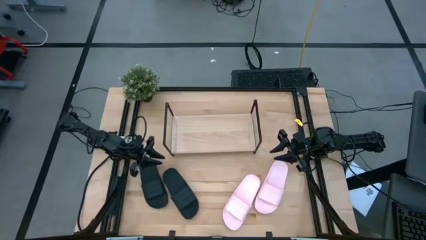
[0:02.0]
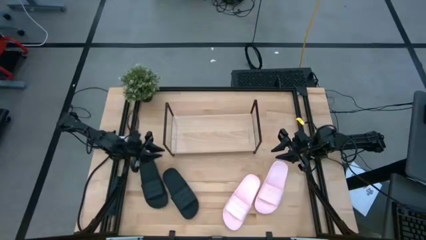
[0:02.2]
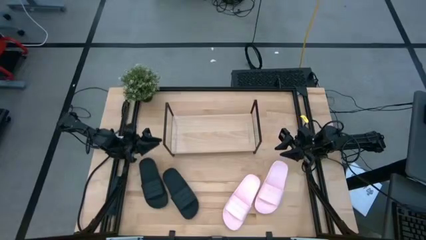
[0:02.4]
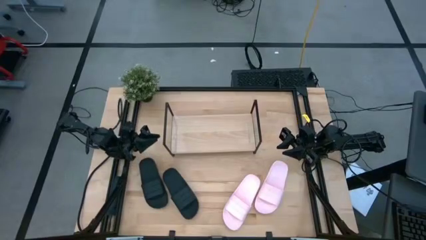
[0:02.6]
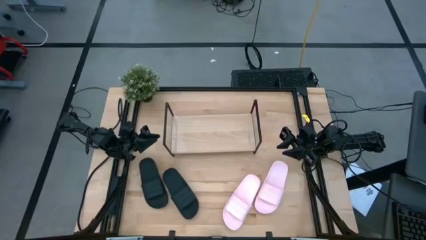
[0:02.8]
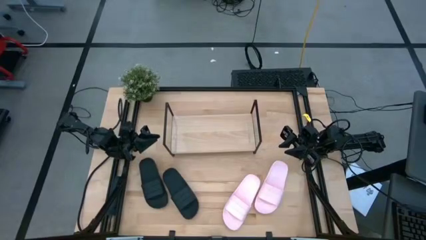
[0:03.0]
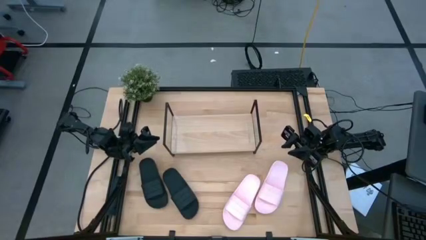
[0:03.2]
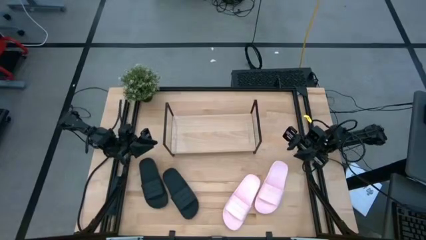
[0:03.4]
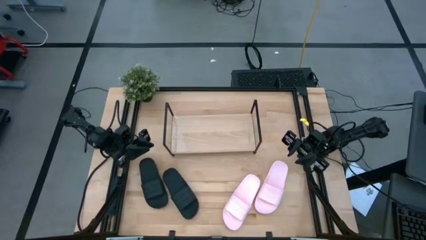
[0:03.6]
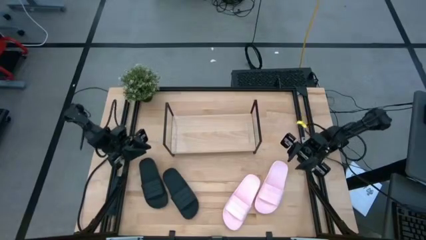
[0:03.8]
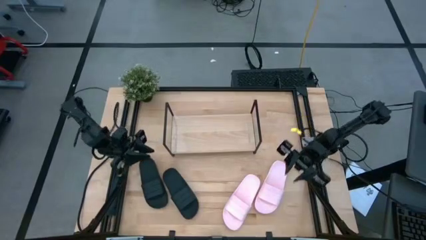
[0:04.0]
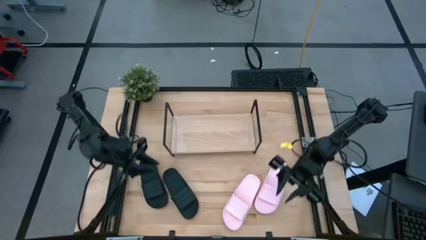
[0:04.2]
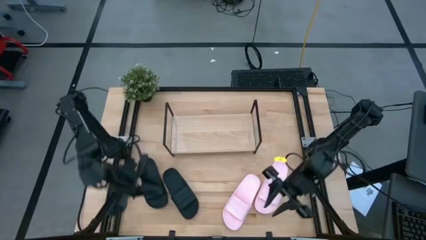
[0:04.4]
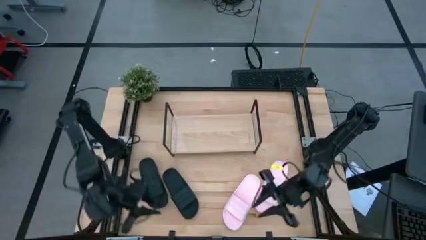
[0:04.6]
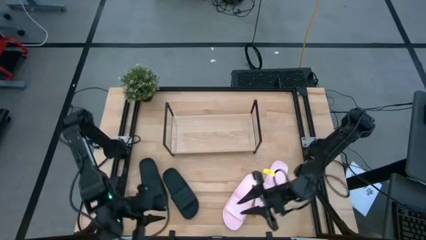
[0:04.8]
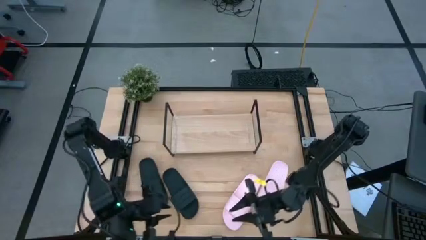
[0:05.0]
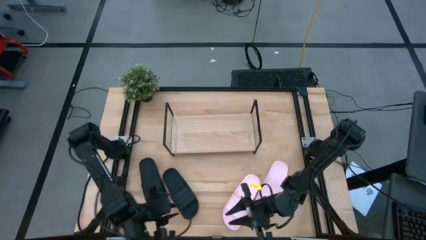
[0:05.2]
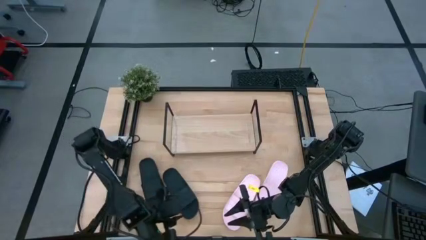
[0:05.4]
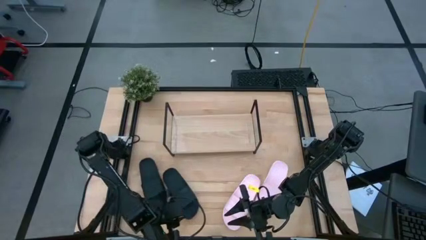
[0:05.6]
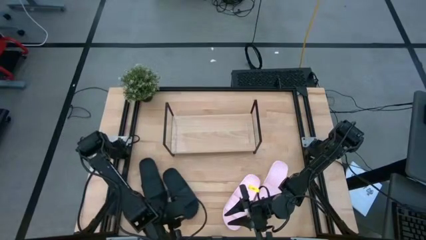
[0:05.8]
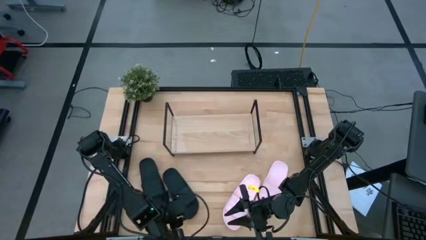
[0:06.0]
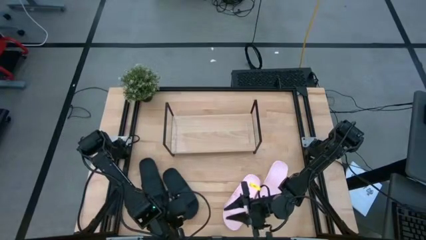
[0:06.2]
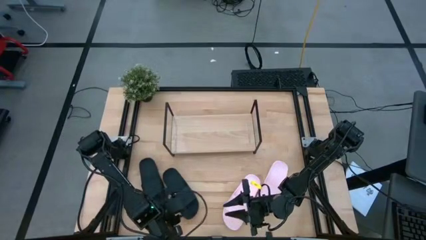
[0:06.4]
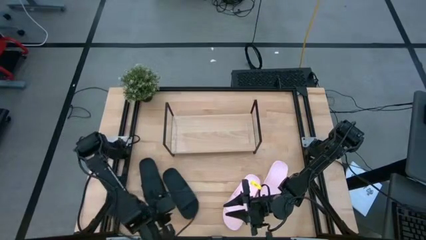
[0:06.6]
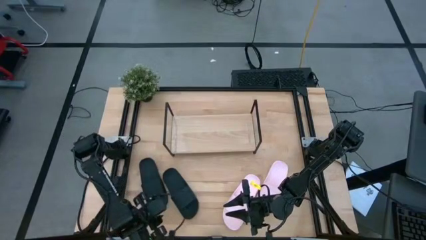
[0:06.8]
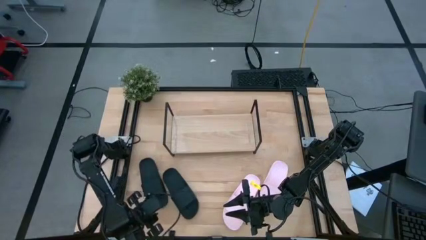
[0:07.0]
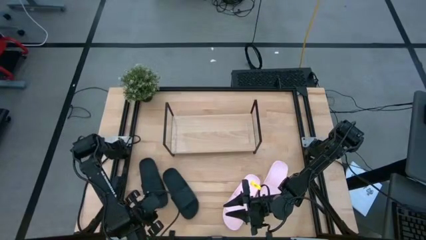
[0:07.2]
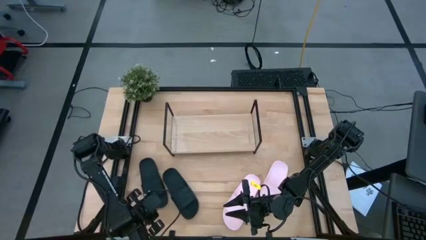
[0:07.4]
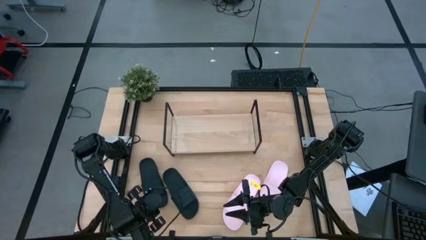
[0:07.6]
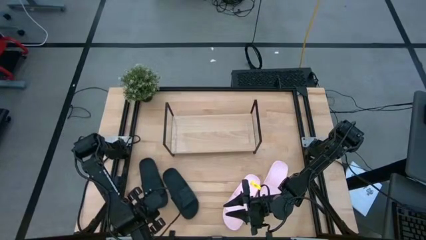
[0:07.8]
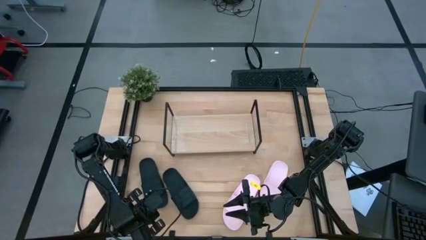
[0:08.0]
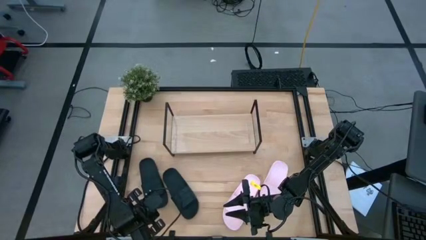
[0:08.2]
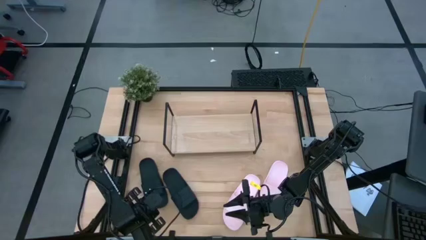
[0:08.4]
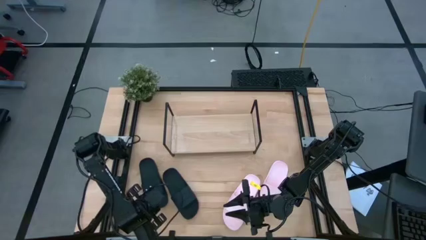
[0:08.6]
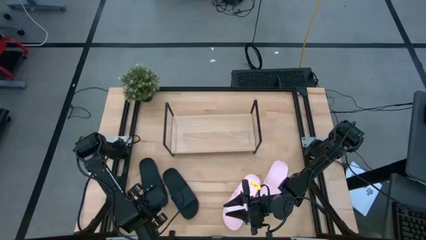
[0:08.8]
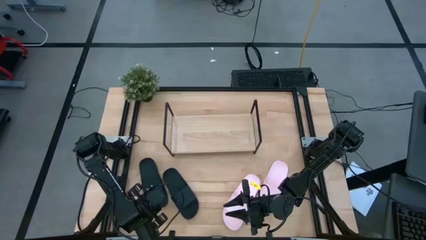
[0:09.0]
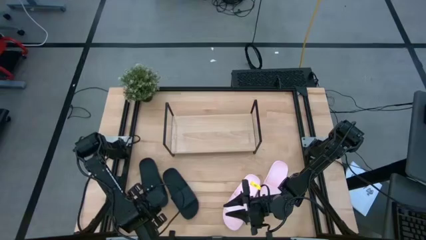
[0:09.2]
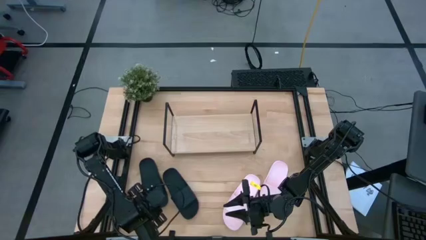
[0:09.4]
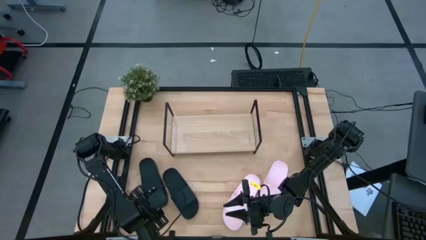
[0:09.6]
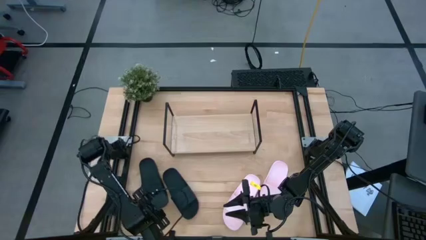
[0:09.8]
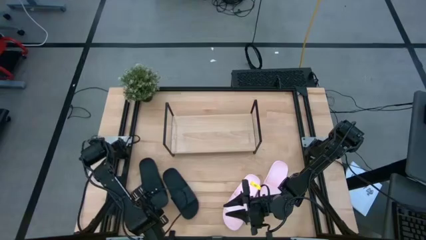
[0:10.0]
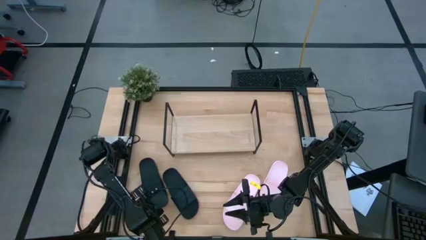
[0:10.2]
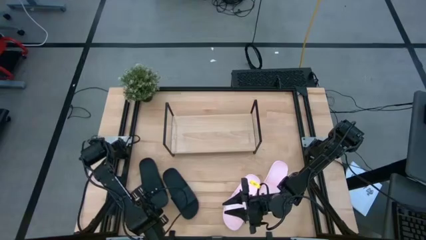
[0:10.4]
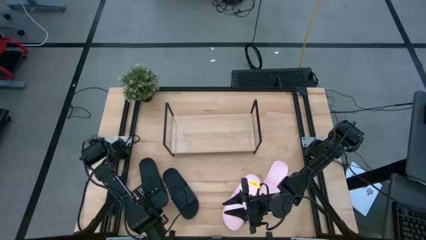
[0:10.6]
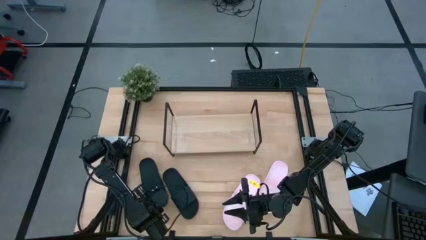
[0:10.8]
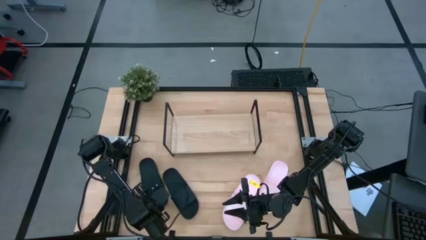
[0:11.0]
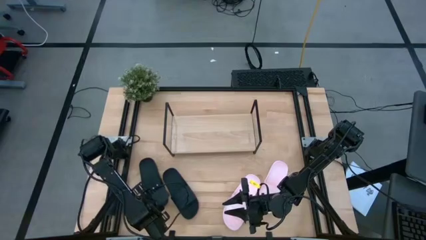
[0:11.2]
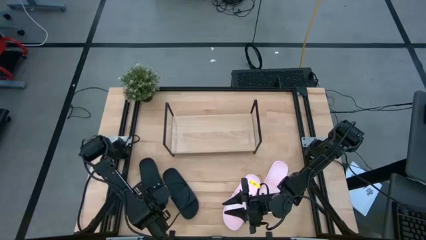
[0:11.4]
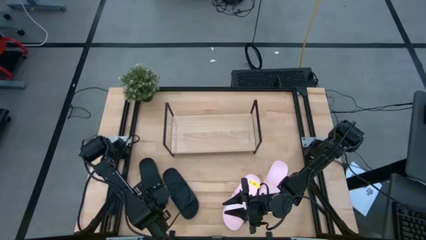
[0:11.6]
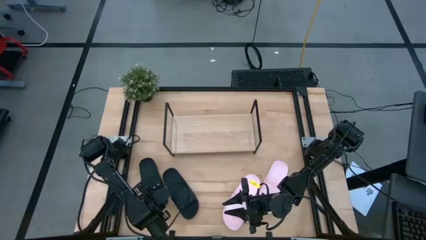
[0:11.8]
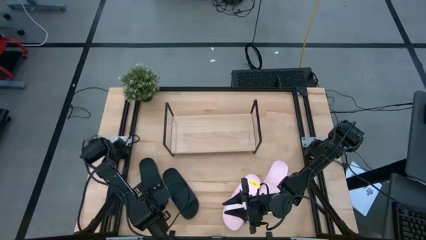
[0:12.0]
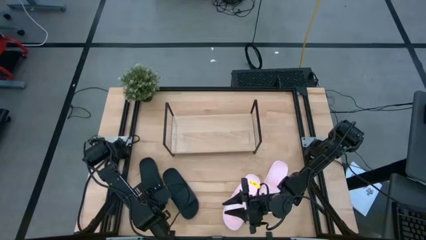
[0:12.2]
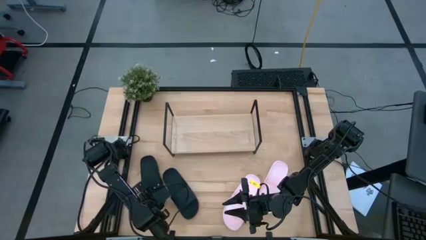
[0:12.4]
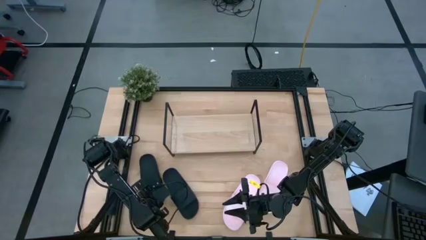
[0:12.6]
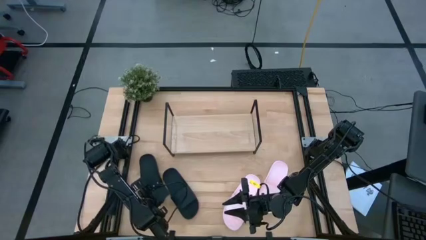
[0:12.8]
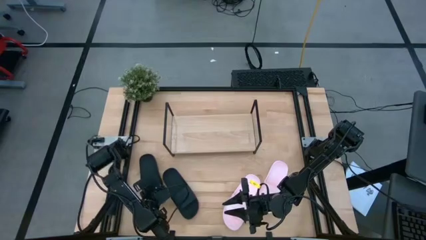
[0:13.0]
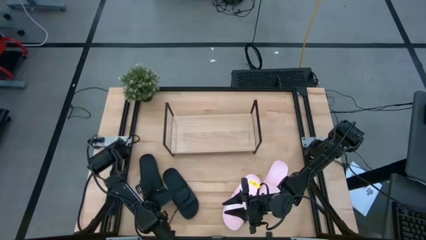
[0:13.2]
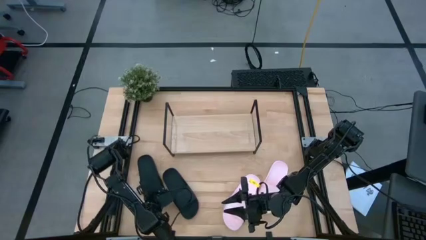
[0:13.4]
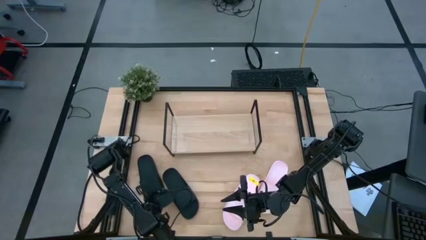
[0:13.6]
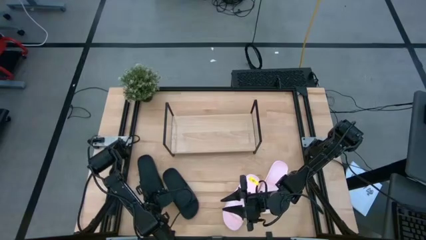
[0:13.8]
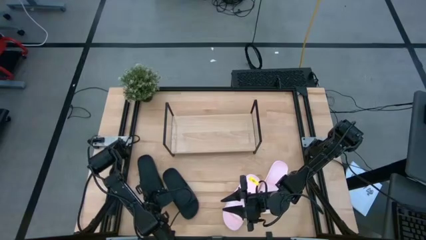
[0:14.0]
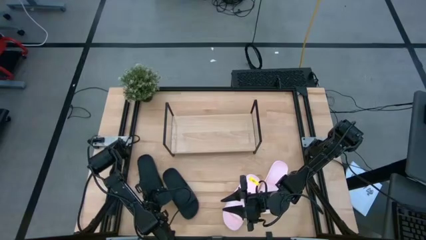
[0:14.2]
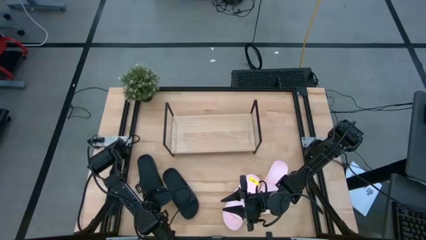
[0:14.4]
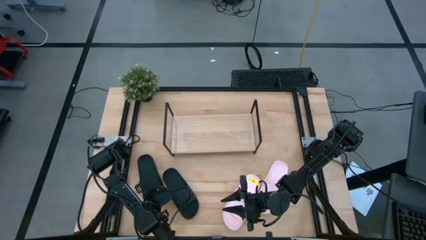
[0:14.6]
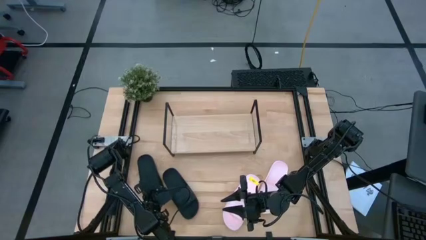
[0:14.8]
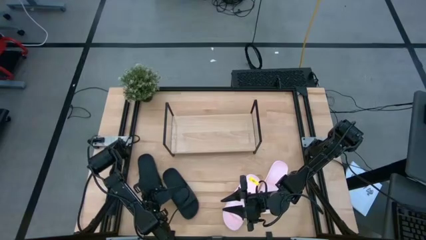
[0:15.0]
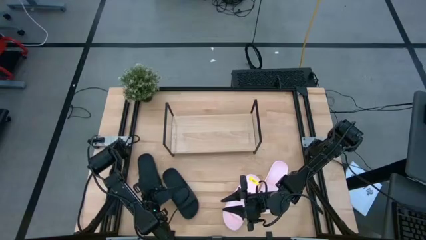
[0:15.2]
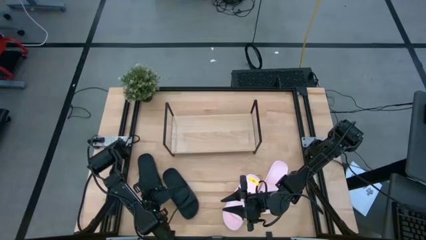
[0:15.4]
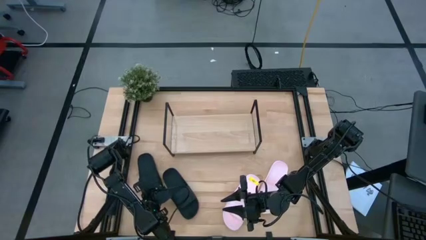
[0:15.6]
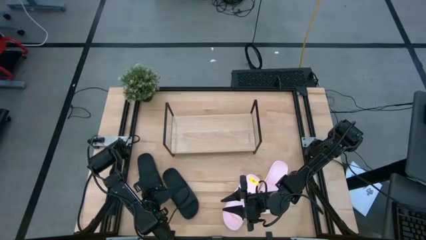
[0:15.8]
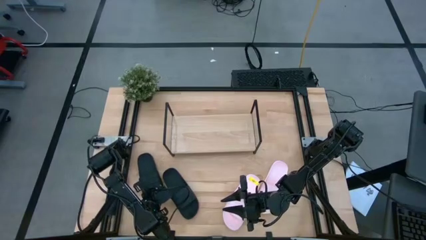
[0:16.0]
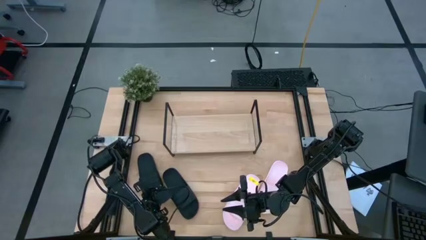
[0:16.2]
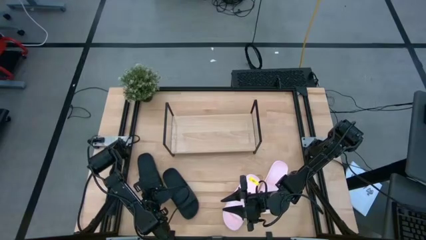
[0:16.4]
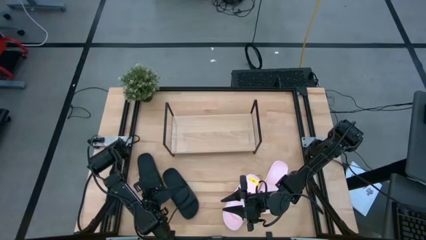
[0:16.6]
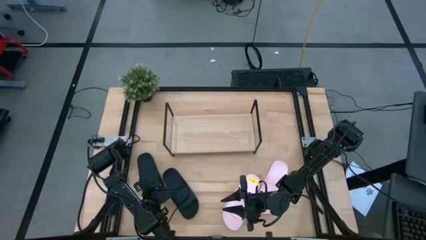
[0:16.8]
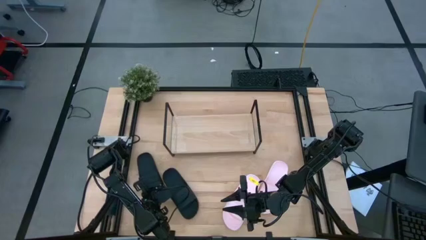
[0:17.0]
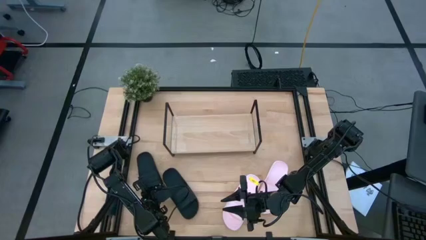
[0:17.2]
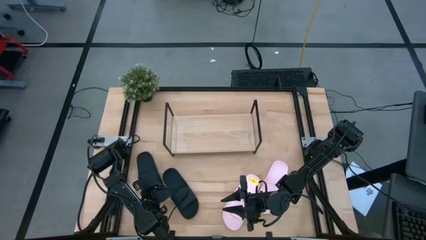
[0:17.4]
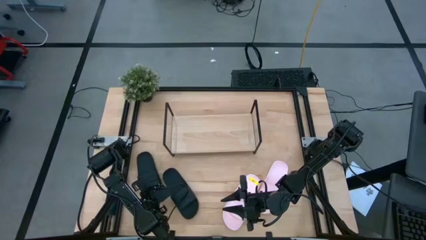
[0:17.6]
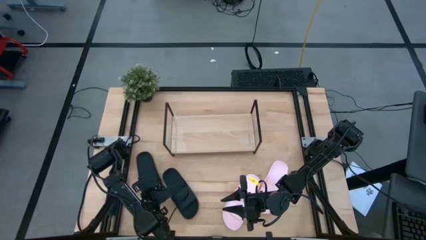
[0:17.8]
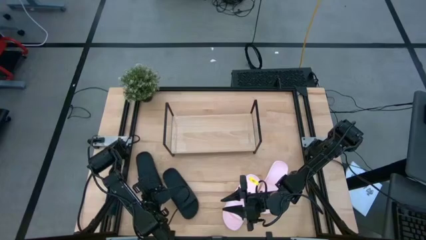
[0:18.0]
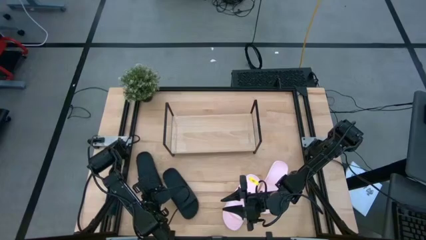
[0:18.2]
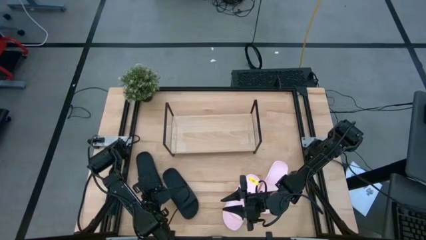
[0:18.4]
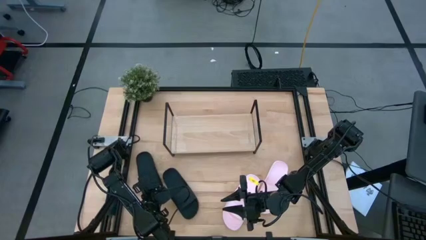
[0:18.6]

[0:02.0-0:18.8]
Task: Pick and place slides into the shelf
Put the left black pair of slide on the shelf
